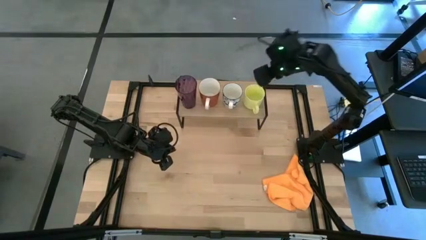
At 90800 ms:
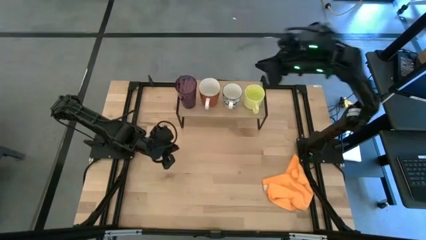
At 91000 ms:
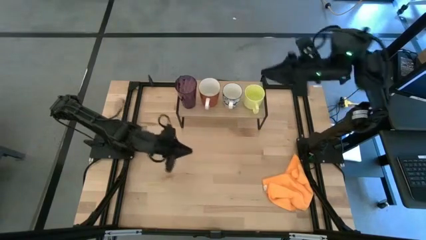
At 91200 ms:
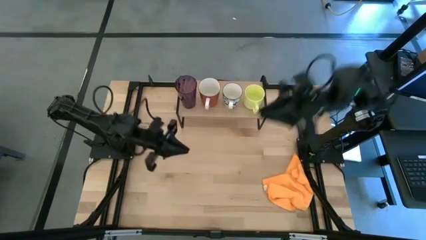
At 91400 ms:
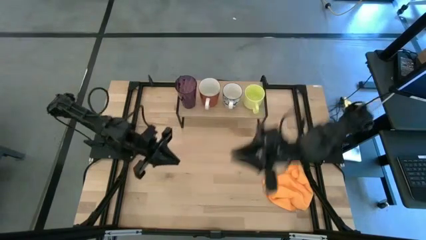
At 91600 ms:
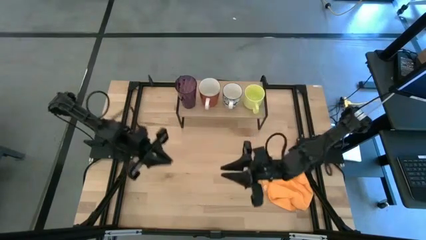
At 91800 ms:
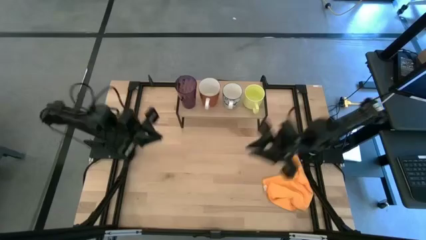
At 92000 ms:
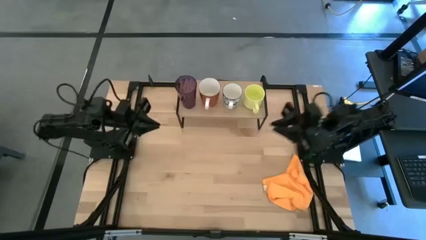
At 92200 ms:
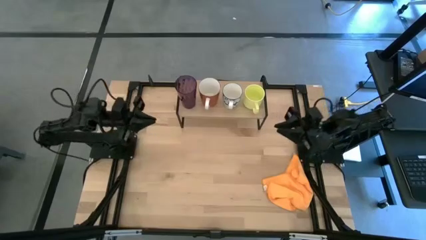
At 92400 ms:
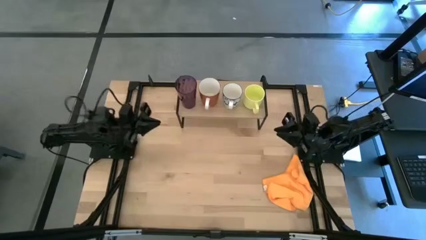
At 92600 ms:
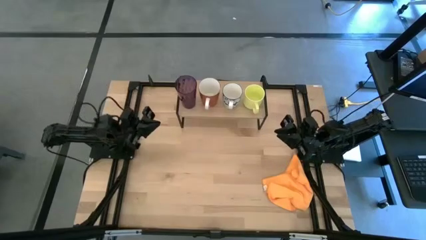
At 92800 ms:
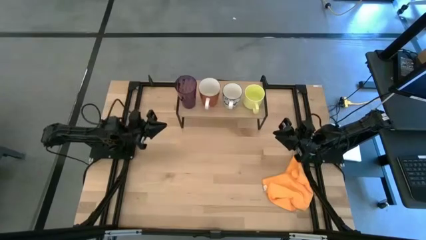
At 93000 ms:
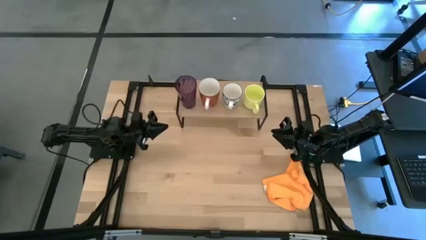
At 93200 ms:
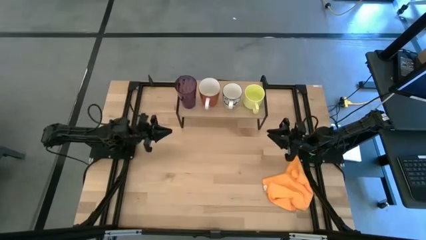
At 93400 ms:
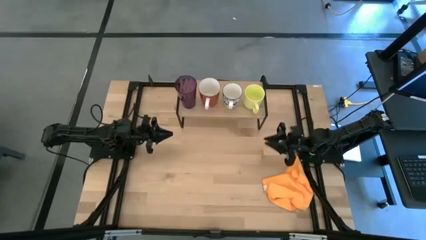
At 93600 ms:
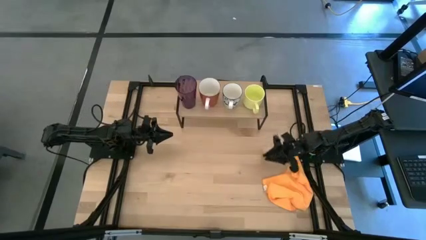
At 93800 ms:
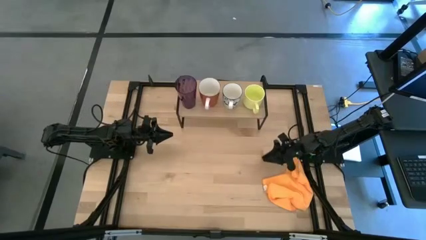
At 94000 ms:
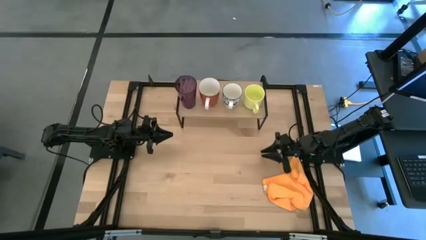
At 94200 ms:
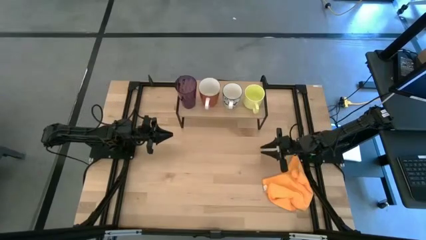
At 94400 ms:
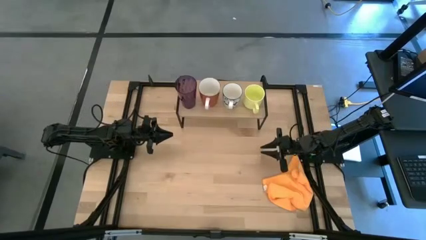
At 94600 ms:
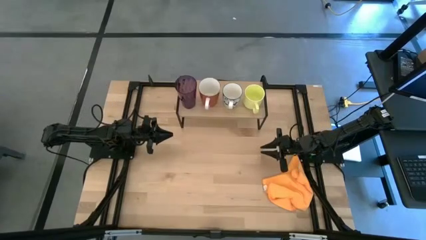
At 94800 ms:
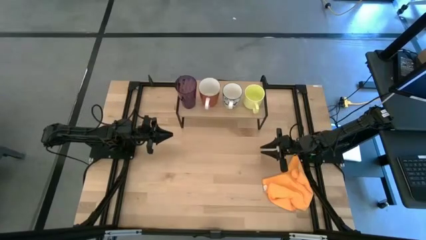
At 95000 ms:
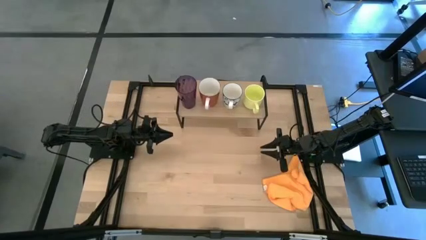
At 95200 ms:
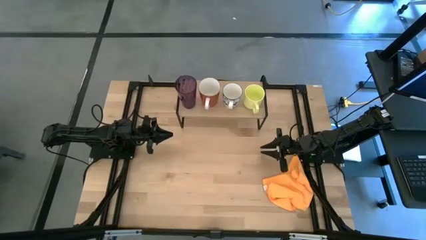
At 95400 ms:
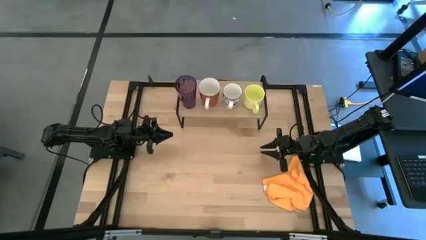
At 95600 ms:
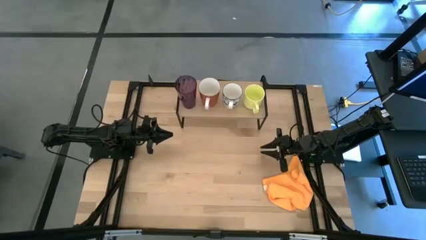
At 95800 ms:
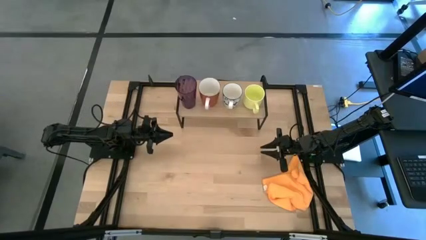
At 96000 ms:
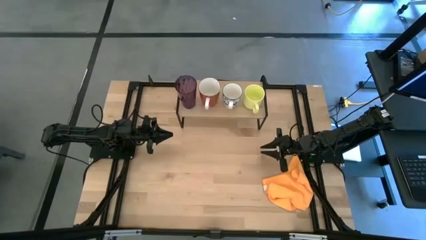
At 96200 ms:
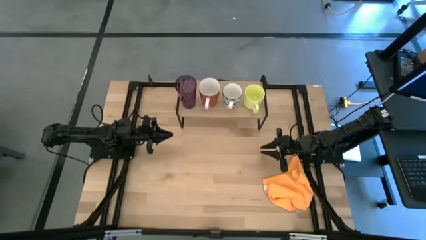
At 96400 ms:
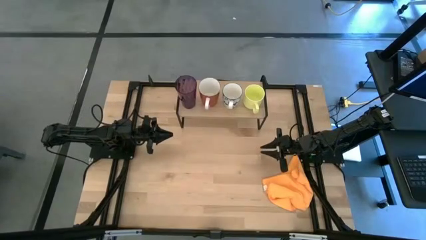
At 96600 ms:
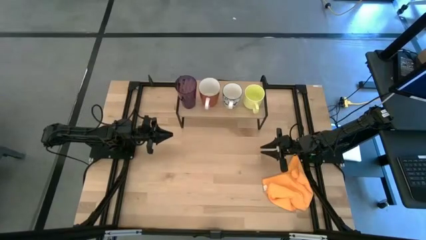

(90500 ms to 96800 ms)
Task: Stack small to large cups/mugs on shelf
Return to Home Position

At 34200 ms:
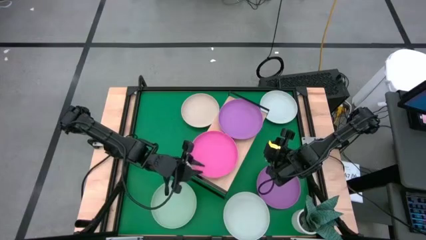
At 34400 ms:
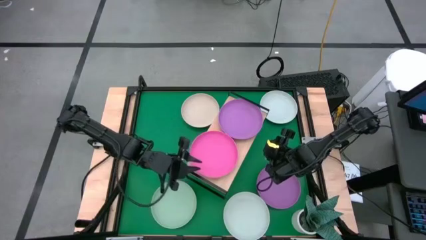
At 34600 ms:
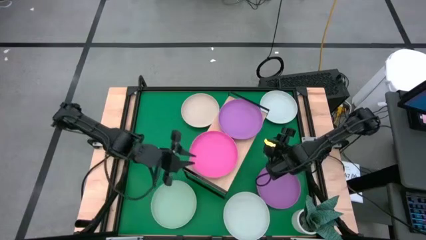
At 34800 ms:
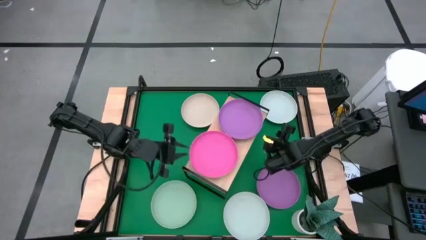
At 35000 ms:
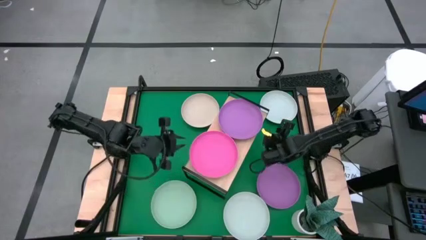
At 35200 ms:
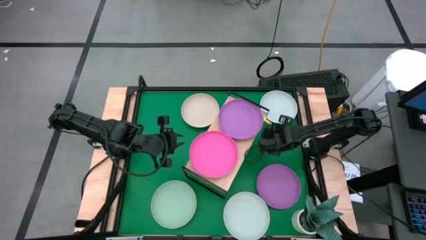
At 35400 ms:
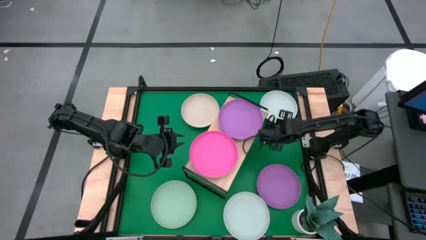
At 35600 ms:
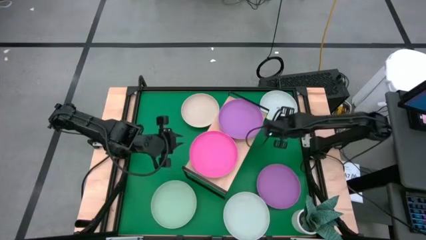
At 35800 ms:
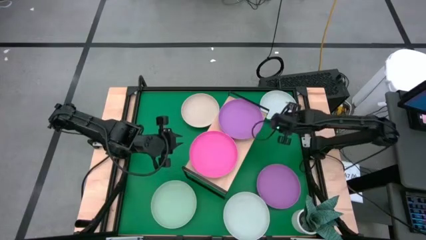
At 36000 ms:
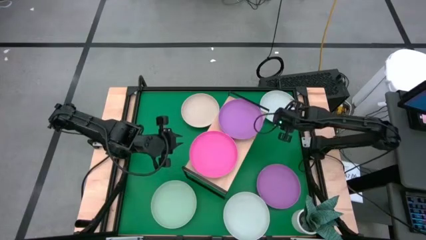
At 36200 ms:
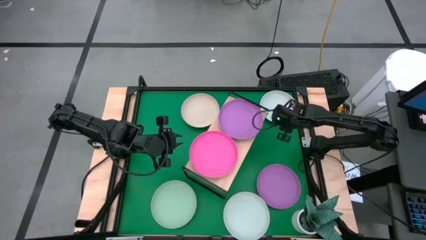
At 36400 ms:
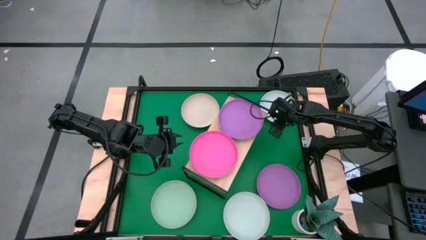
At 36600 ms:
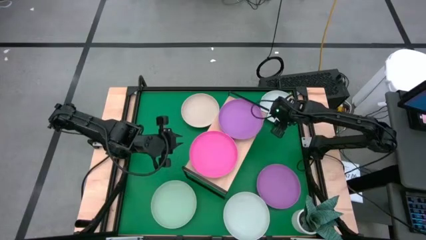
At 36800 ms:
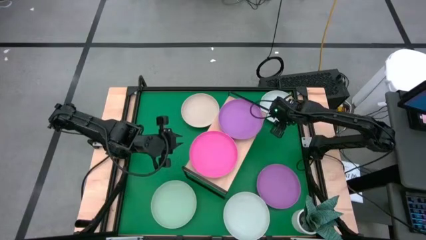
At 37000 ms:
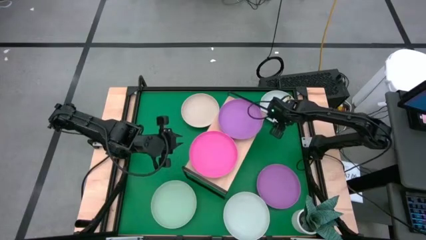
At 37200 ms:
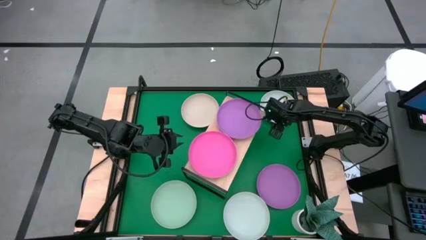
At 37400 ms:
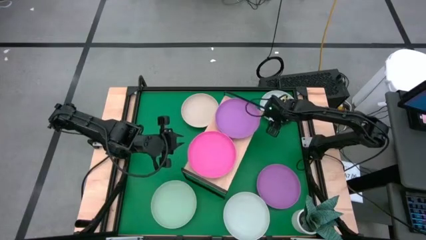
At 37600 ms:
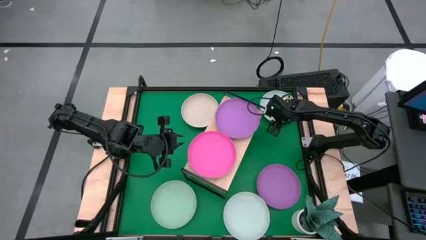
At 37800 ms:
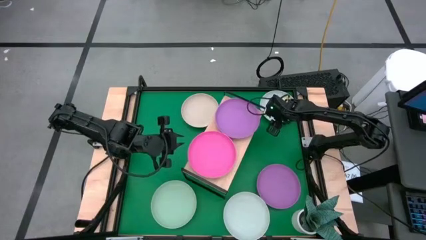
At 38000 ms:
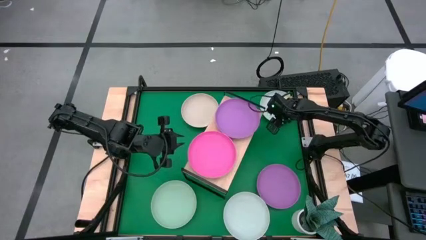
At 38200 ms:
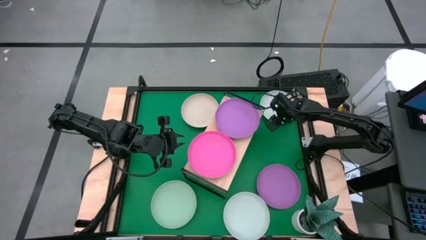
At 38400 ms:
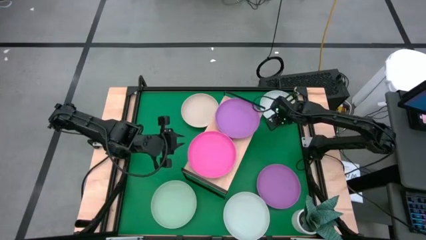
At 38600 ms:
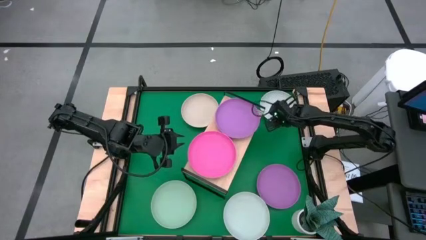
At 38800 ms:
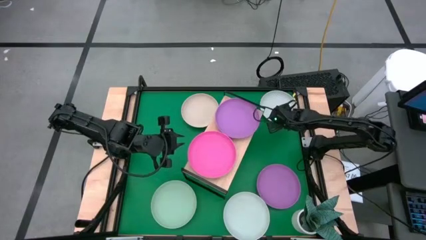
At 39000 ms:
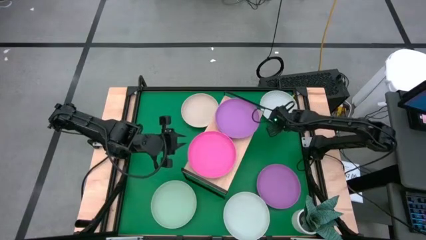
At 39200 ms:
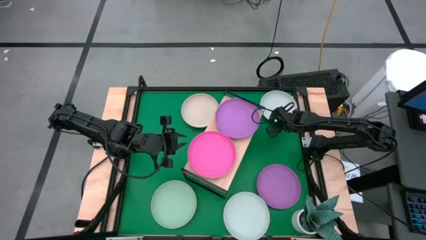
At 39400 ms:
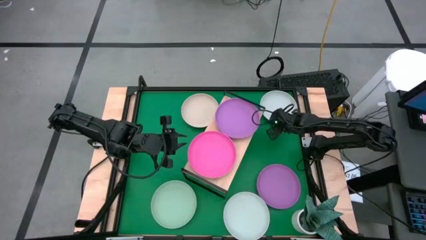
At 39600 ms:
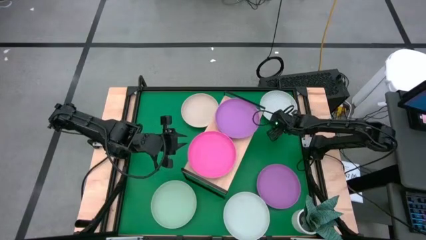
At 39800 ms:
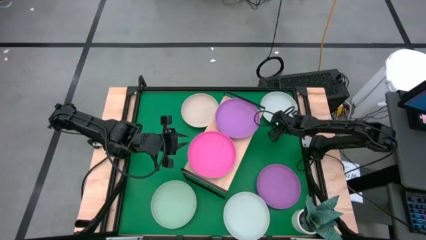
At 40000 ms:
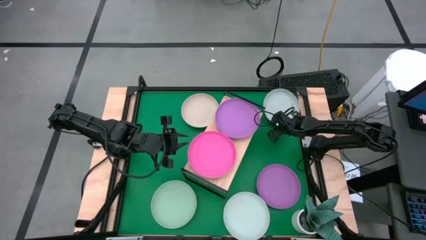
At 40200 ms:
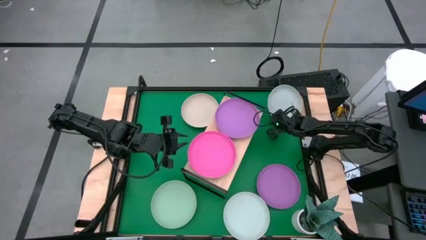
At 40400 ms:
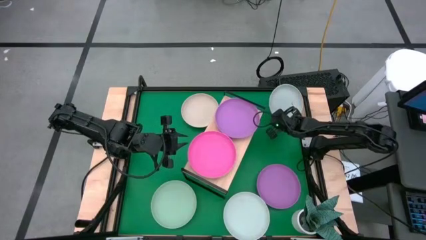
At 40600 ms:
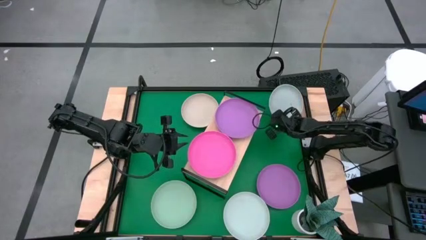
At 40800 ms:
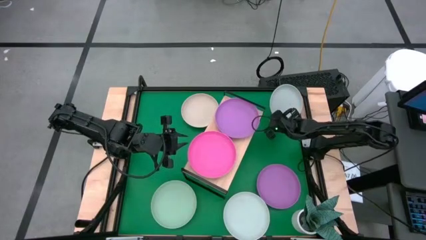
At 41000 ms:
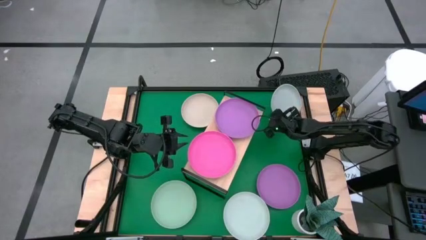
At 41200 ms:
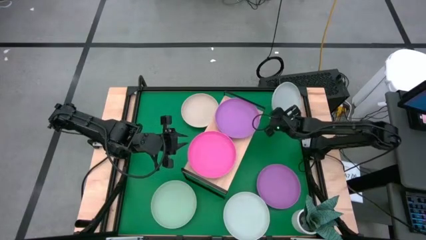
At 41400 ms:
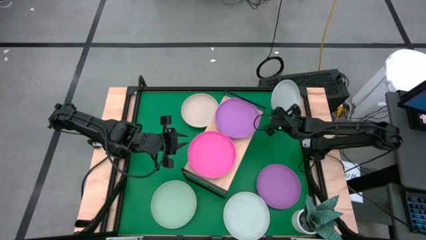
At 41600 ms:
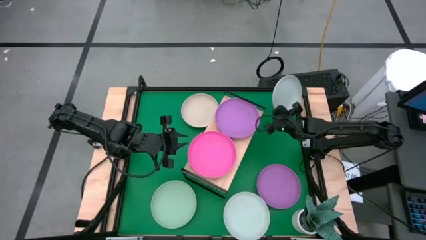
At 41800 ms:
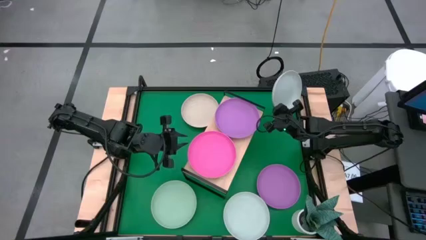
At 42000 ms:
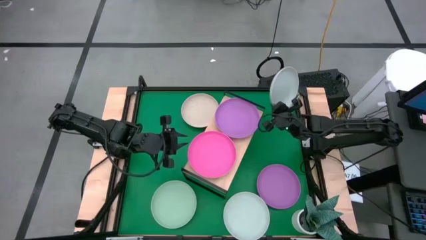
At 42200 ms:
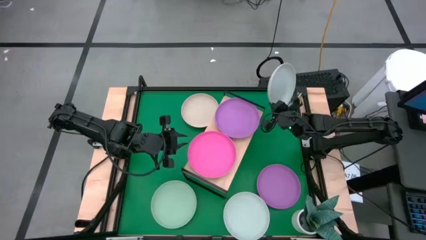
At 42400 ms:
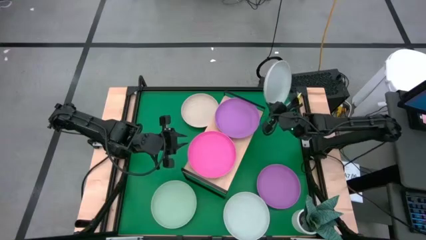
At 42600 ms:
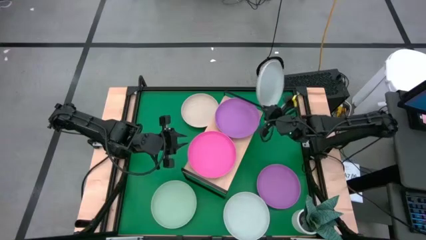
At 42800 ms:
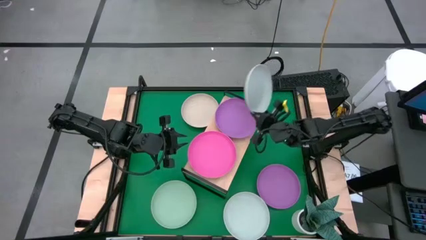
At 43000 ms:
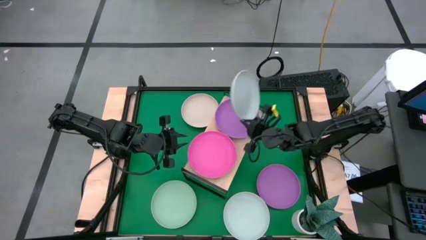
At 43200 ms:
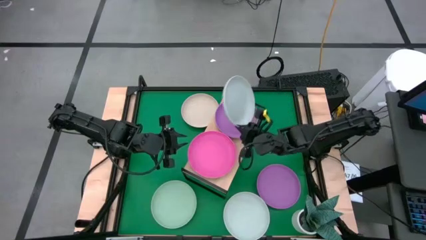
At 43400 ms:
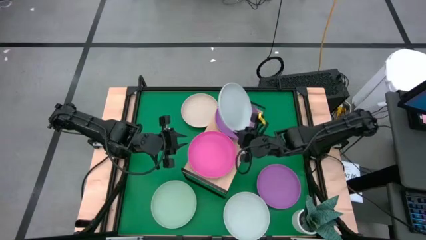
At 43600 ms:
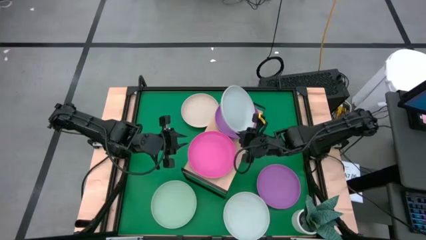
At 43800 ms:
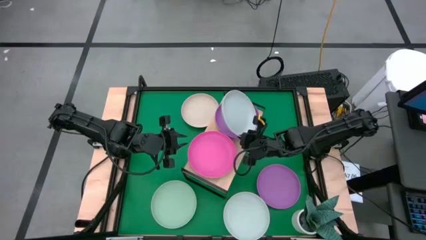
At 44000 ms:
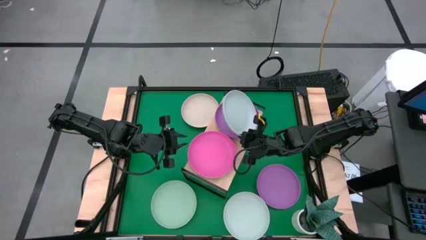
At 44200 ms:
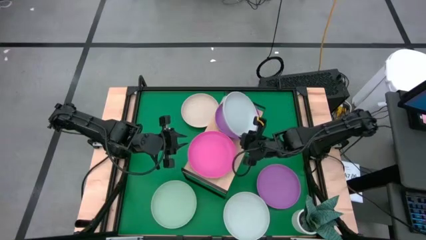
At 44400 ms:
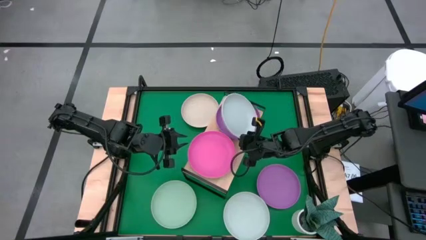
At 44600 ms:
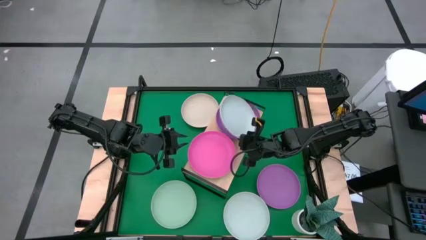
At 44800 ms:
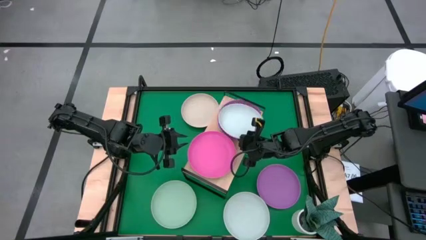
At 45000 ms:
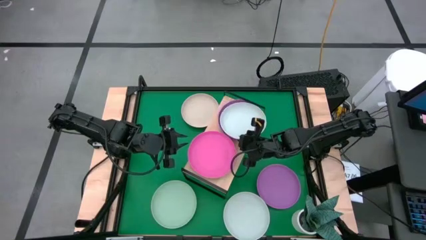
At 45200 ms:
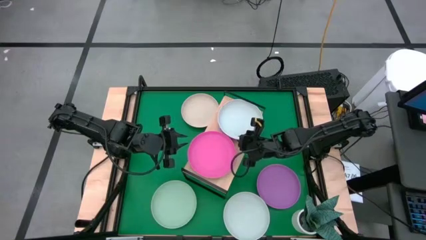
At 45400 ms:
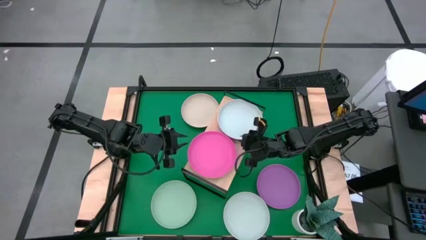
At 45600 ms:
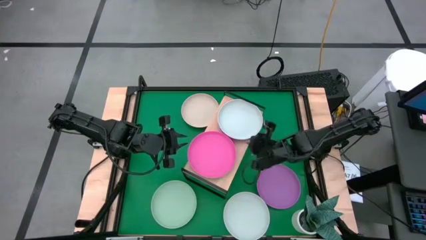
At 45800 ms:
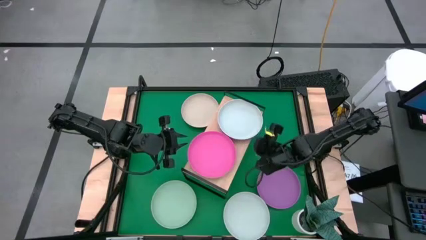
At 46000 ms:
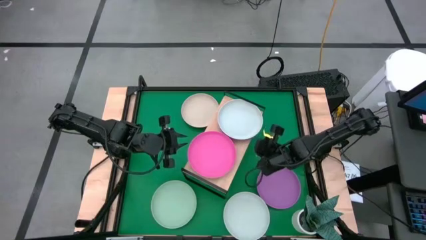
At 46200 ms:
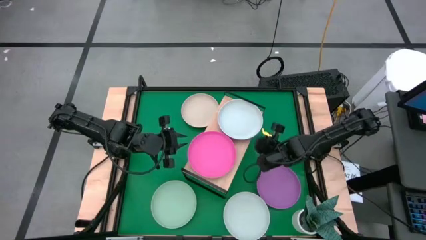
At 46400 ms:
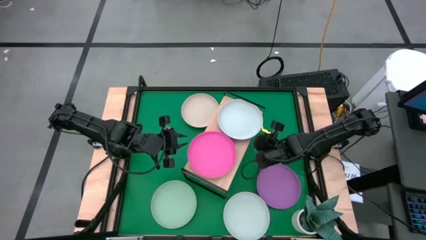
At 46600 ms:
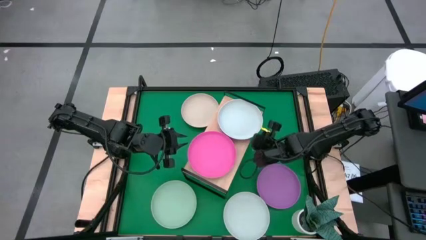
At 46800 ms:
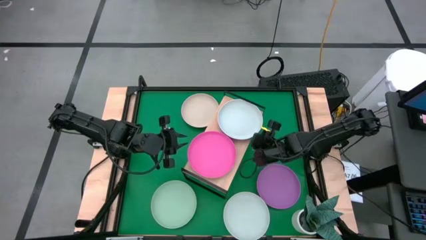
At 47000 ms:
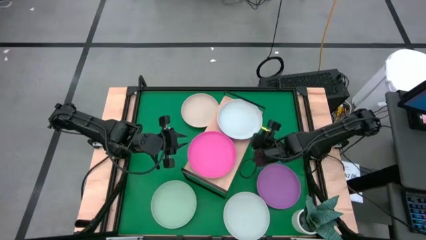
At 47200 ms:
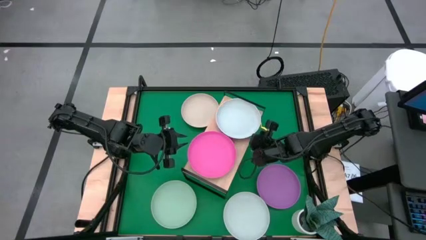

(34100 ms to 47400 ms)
Task: Place and stack plates onto a shelf
Stack the top white on top of the purple plate on the shelf
